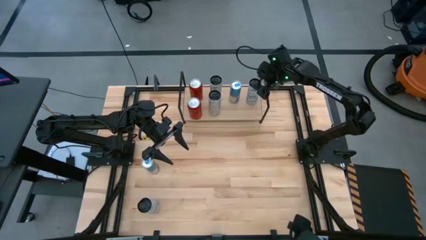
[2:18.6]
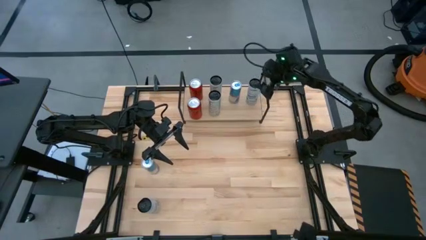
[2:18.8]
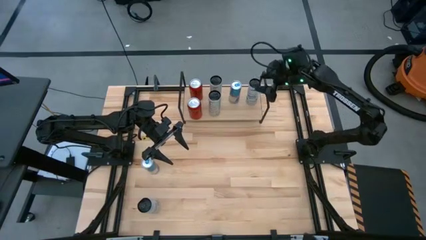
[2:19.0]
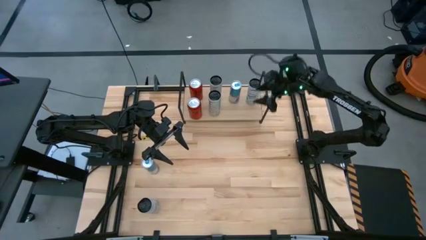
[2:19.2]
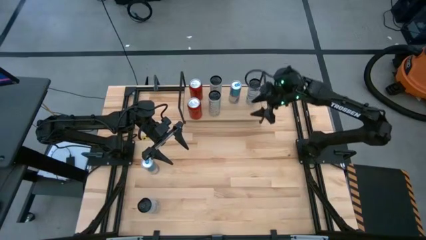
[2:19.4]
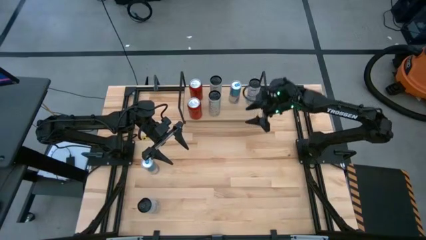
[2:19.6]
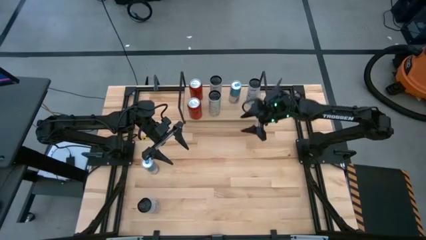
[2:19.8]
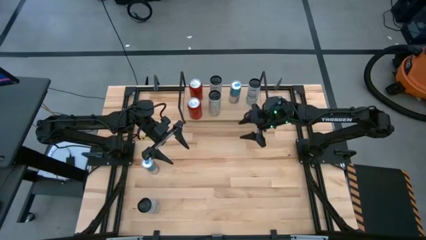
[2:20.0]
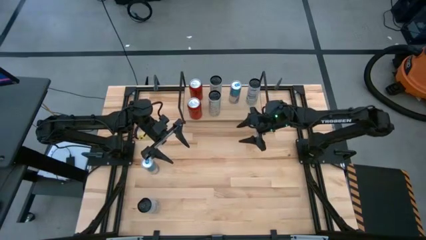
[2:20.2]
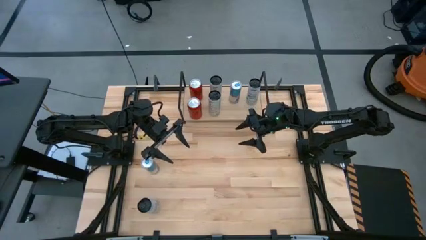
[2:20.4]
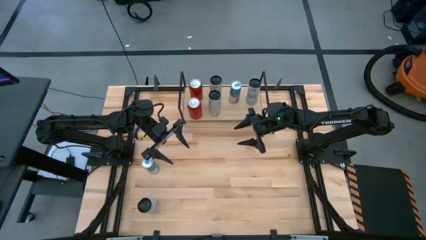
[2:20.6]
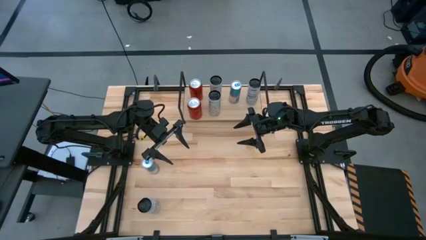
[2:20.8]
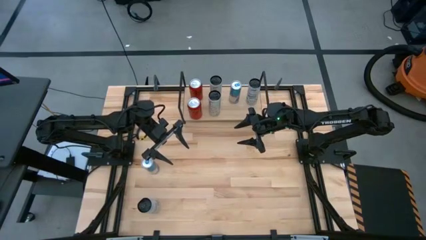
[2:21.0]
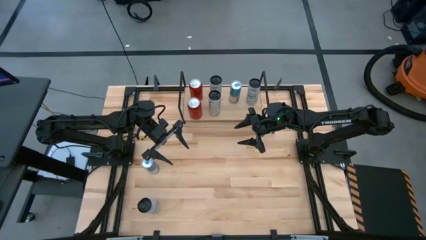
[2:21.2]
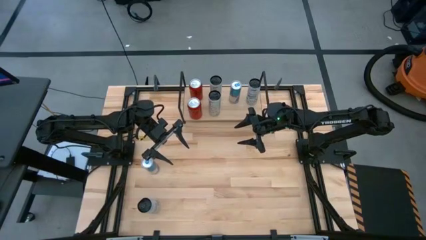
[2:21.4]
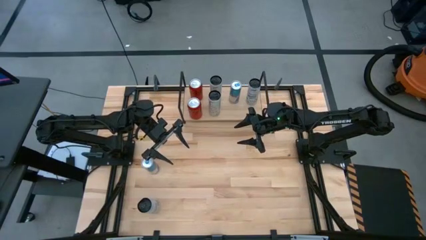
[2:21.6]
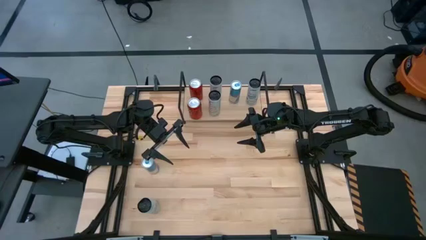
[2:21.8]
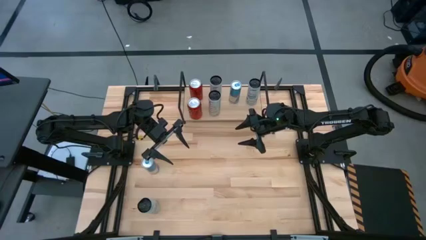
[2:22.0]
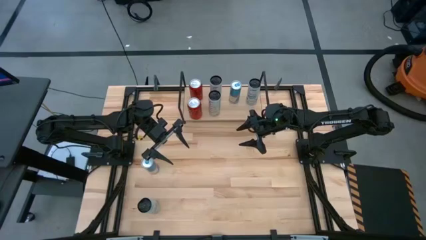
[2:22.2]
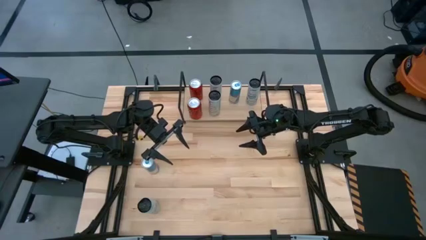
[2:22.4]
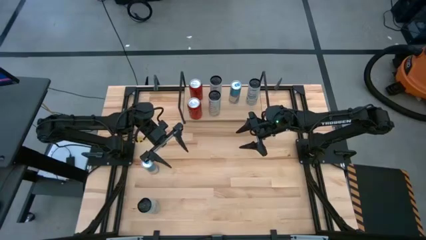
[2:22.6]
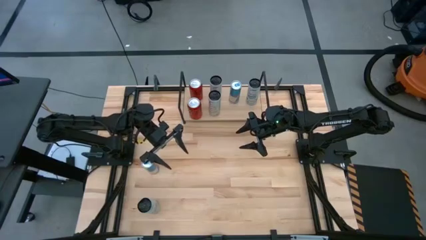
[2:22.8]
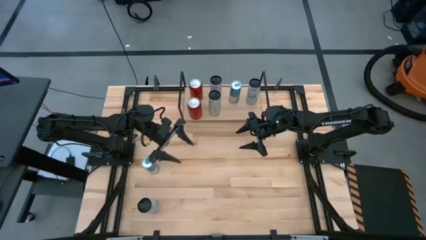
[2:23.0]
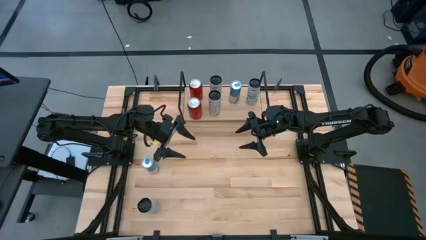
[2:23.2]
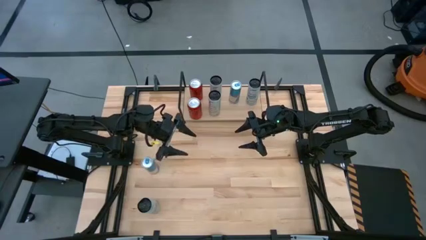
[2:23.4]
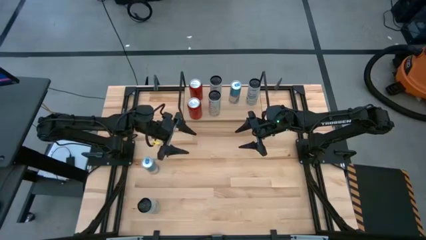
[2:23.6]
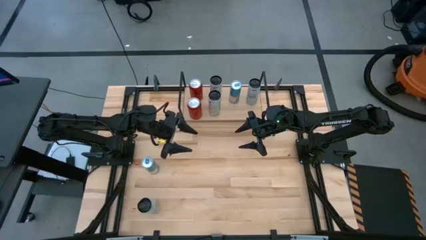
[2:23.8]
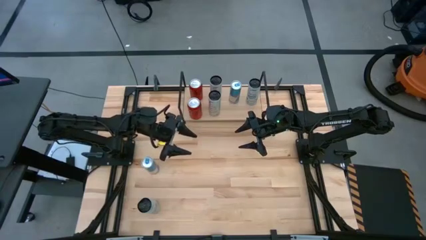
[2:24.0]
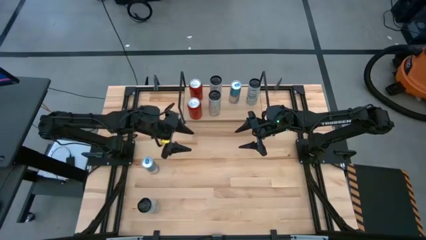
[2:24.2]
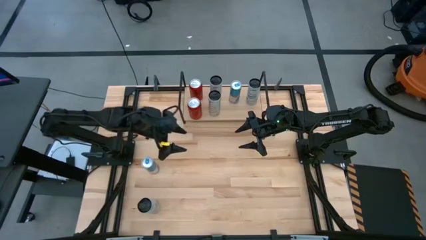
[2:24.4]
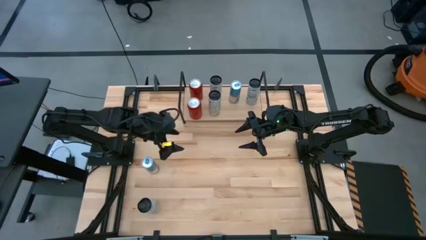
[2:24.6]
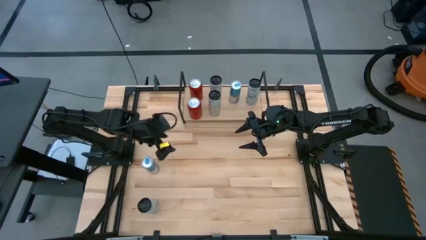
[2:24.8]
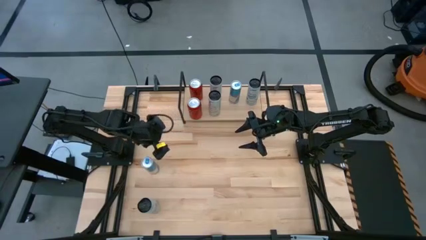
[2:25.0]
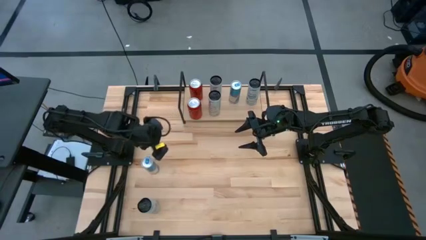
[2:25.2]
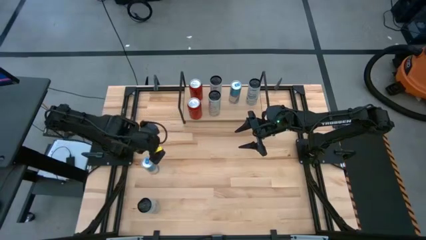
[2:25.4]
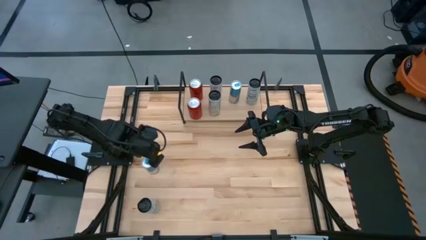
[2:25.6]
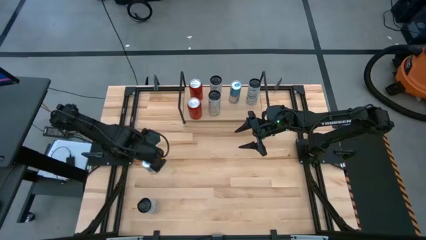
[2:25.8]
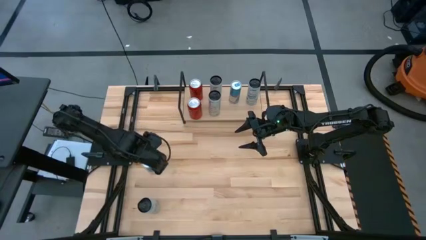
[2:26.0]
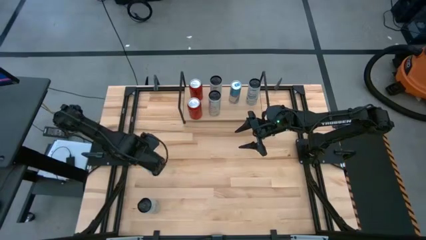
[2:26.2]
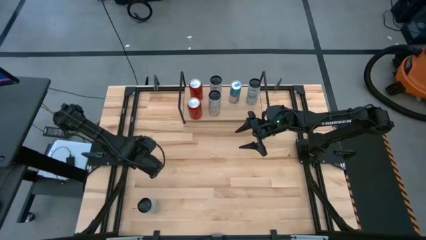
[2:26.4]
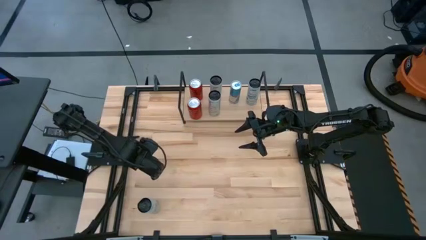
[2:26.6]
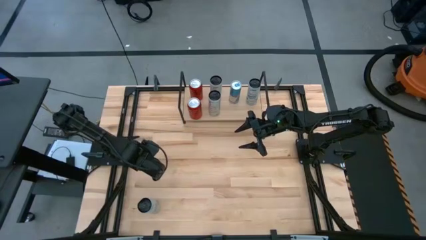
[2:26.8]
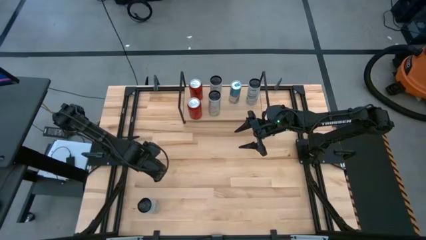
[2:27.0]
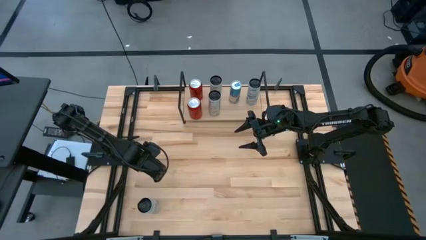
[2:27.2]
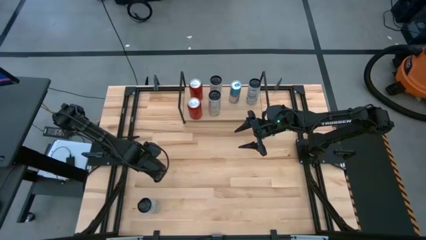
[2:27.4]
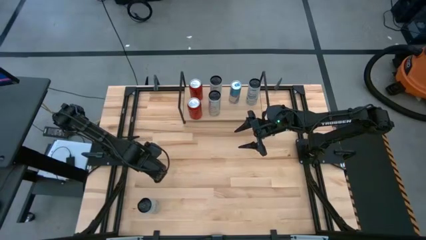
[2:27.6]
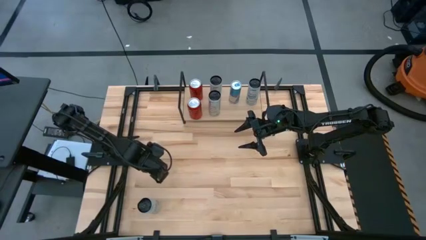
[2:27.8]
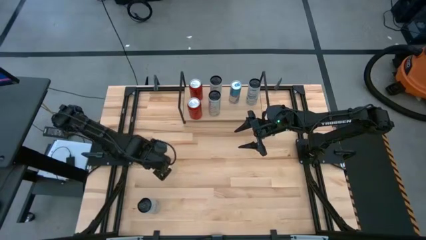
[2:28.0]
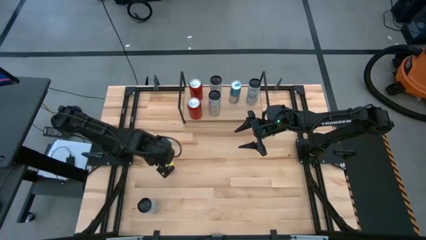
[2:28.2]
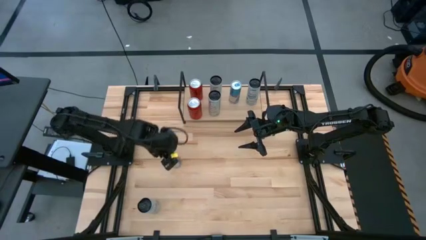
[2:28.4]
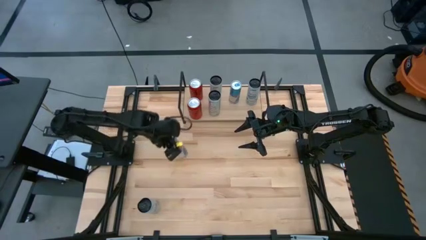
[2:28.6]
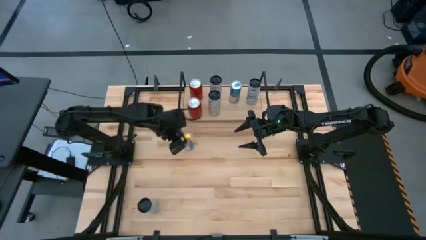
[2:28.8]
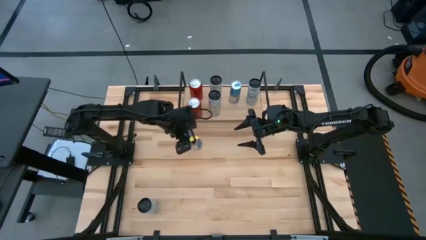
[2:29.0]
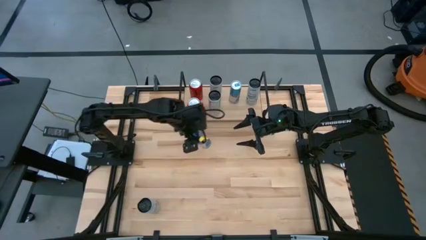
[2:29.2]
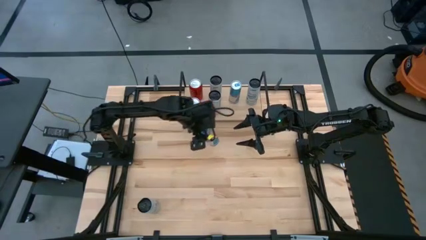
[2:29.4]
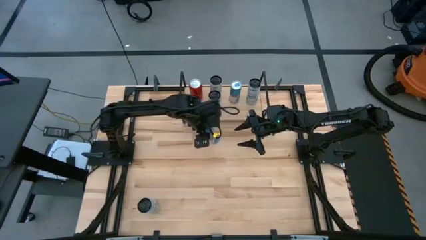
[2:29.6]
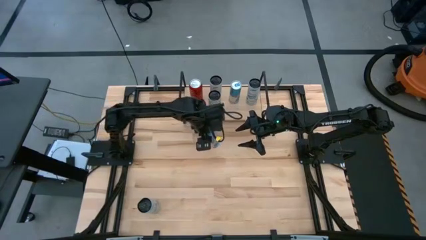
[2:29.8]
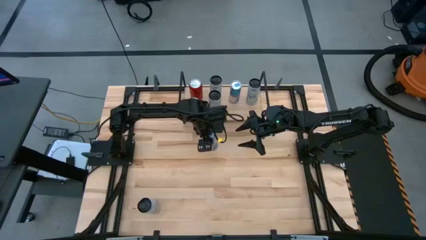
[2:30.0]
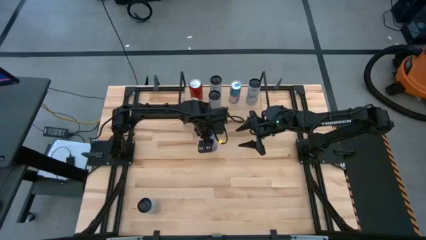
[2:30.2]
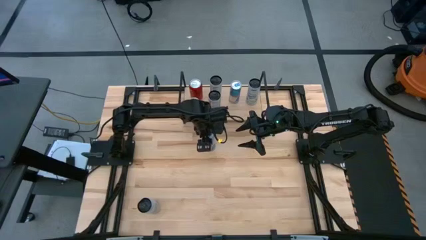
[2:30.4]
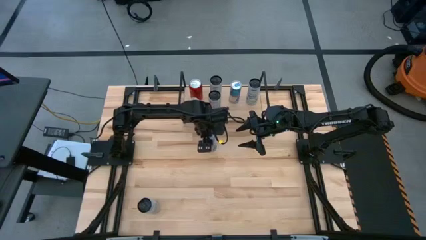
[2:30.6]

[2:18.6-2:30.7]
Task: Place canned beverage on shelf
Put the blue soda can aligned with the other blue soda can on the shelf
